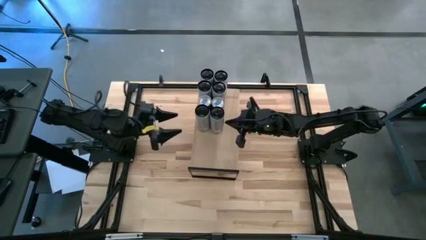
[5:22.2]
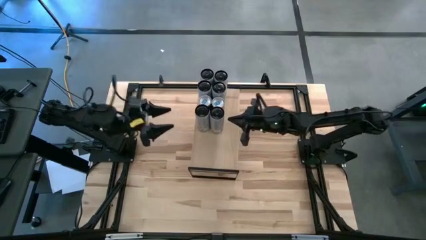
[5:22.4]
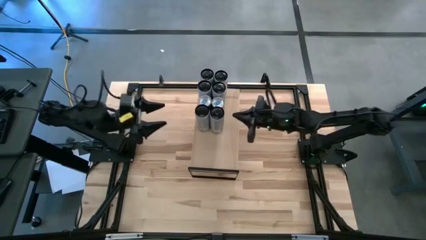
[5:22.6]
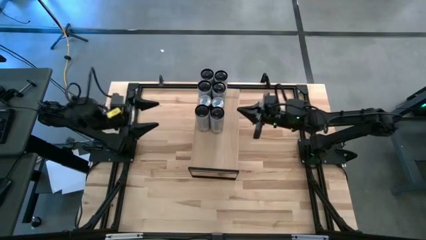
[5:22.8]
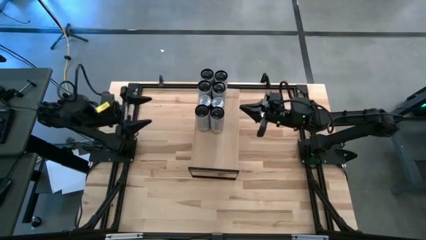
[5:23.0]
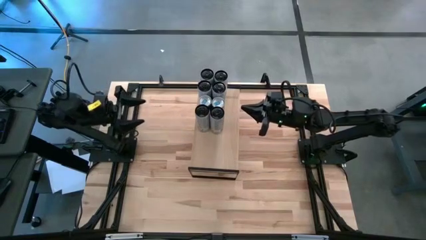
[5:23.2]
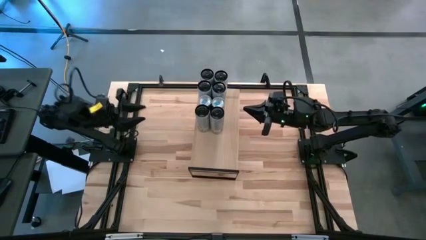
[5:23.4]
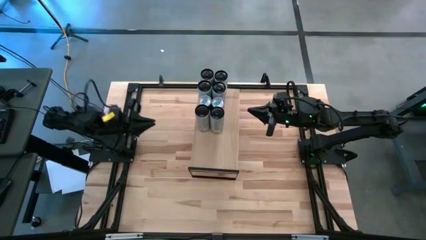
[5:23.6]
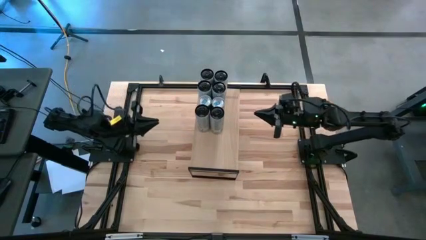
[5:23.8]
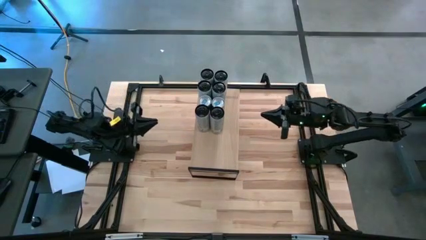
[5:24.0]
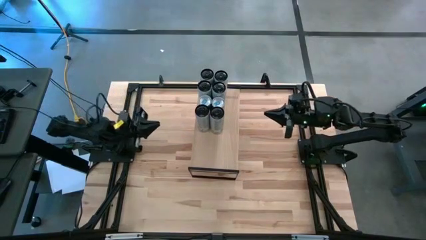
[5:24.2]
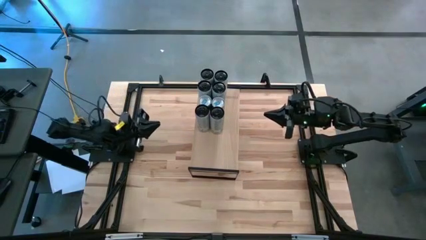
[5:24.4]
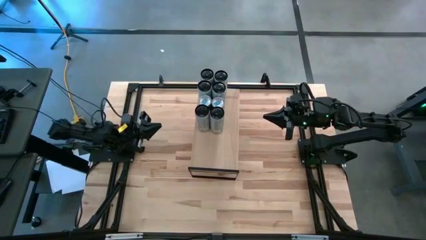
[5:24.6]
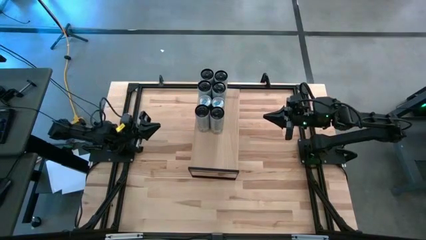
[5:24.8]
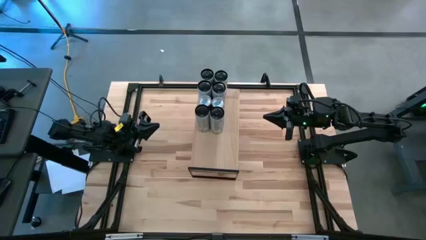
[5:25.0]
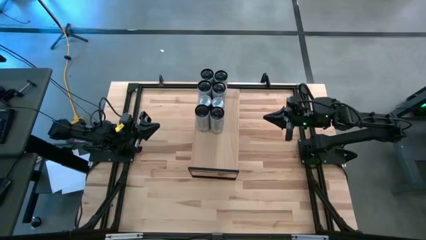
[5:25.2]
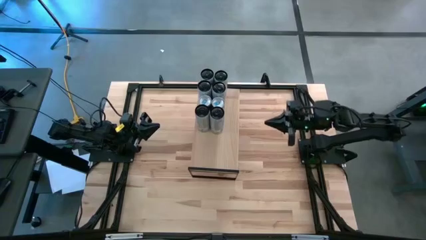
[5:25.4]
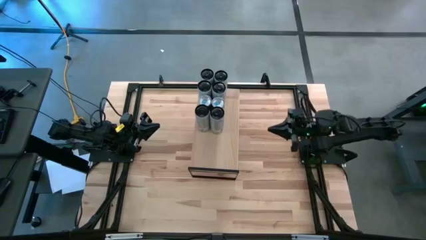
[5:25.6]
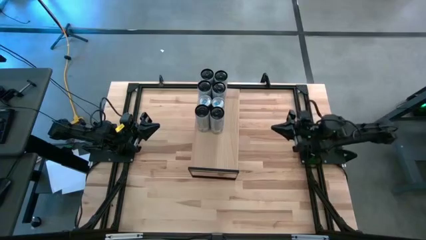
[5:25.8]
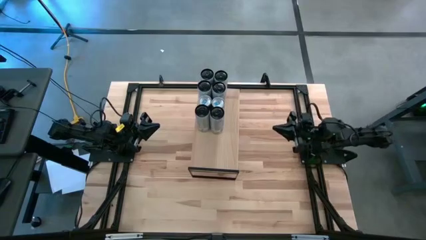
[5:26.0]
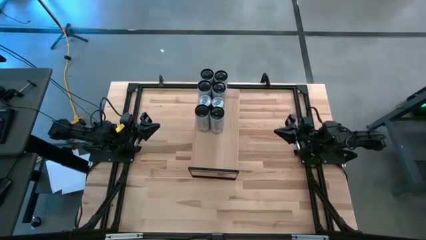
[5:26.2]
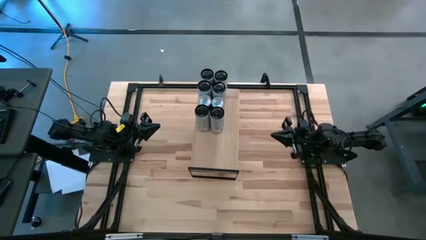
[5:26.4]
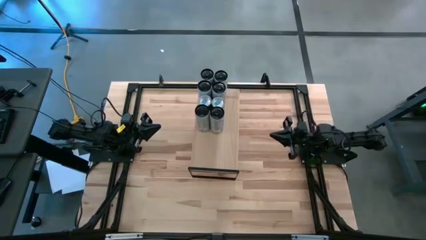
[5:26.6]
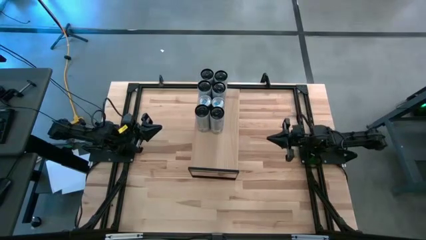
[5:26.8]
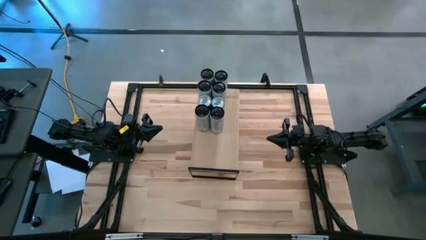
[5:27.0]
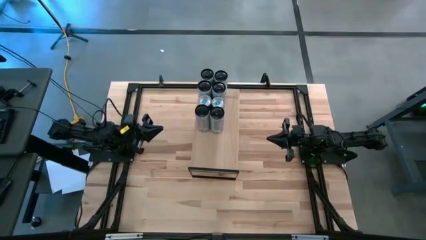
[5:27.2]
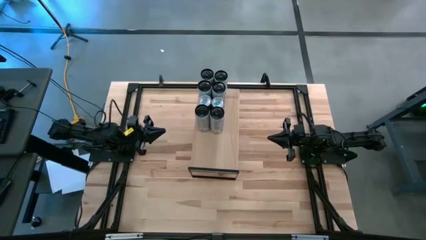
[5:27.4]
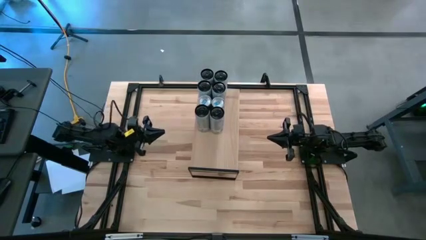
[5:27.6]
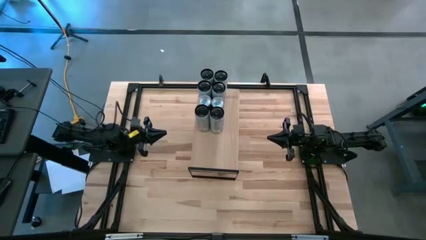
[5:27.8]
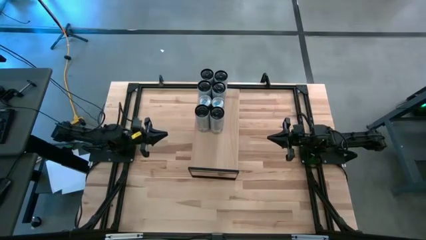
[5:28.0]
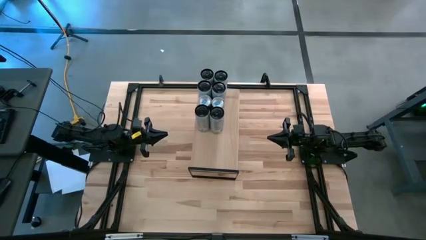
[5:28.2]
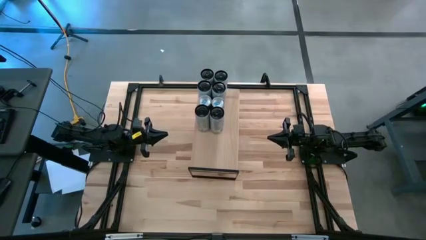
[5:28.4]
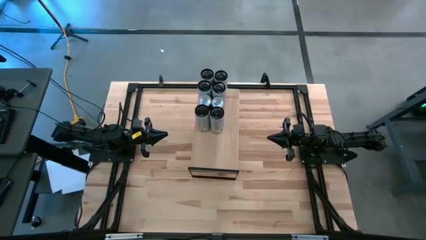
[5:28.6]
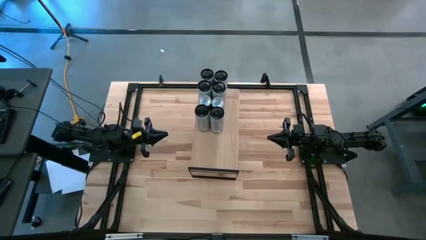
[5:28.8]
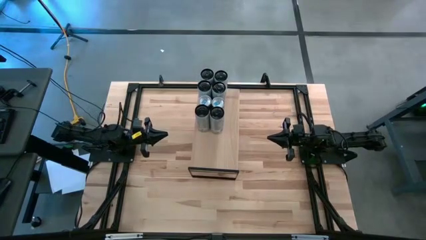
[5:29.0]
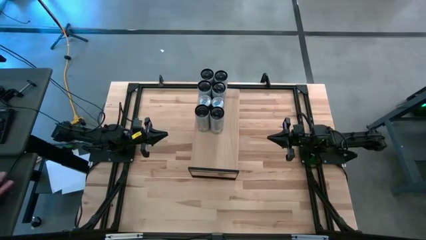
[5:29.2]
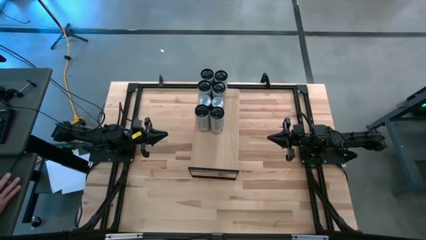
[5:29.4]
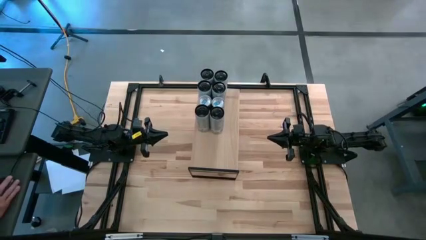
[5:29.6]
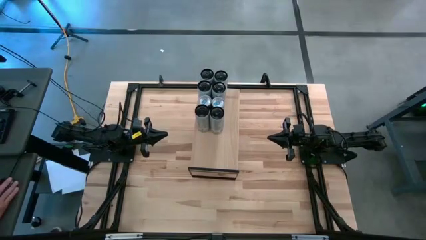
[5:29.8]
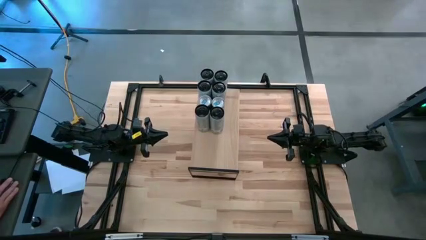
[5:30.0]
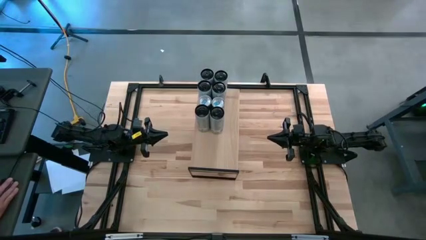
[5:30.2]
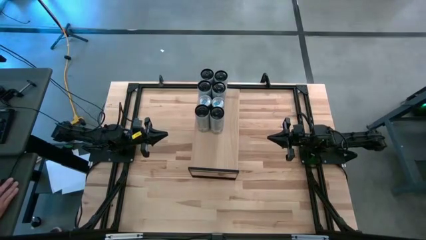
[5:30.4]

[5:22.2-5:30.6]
Task: Place canned beverage on shelf
Return to Home Position

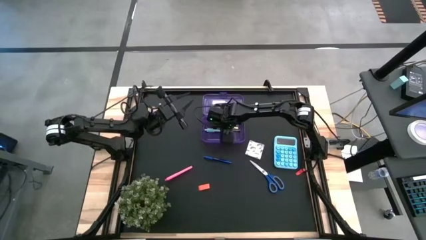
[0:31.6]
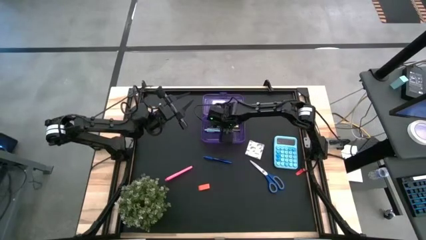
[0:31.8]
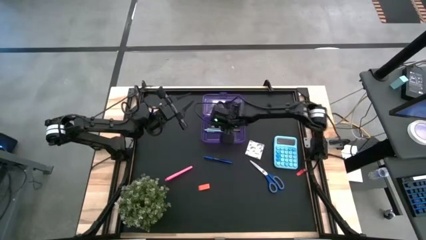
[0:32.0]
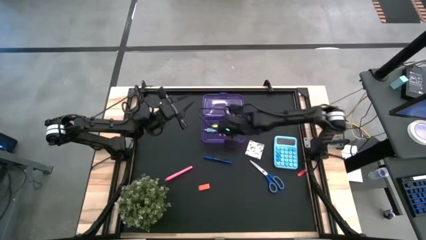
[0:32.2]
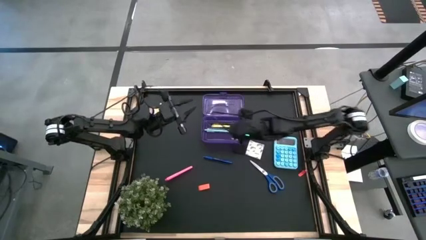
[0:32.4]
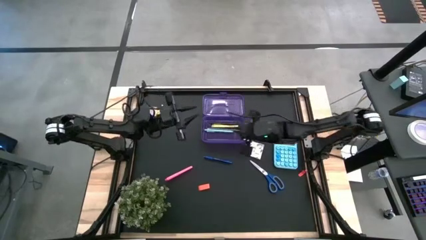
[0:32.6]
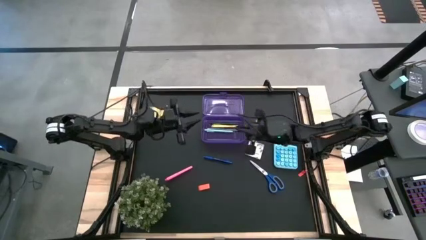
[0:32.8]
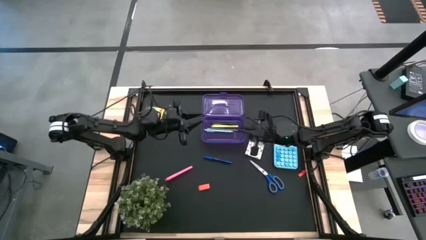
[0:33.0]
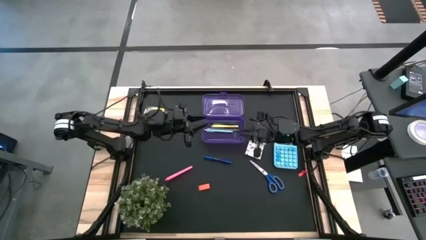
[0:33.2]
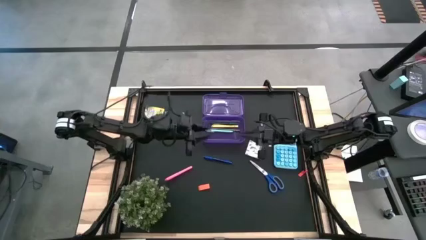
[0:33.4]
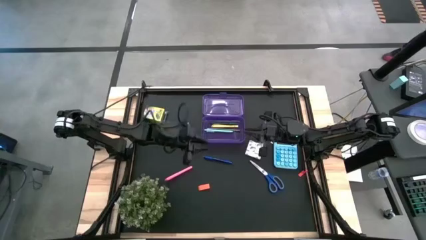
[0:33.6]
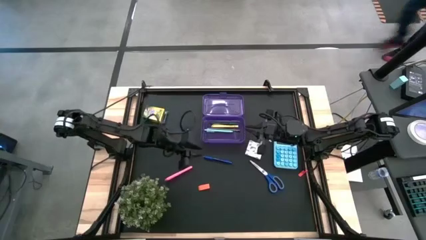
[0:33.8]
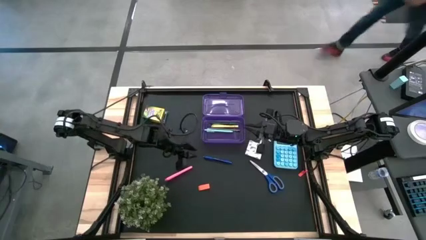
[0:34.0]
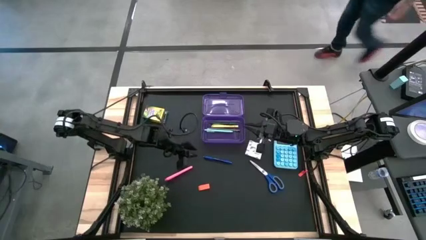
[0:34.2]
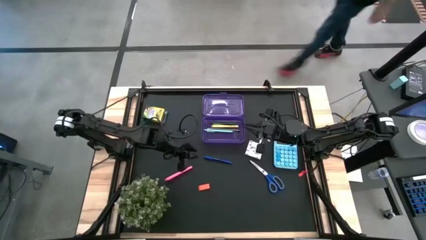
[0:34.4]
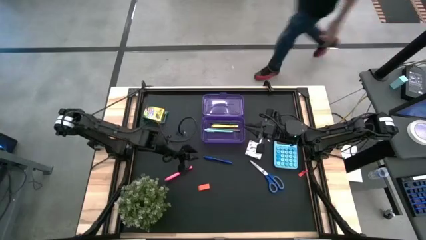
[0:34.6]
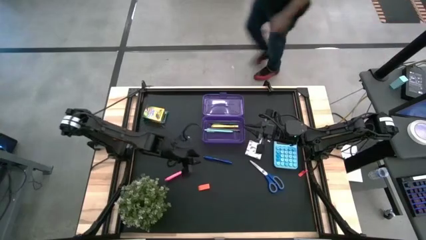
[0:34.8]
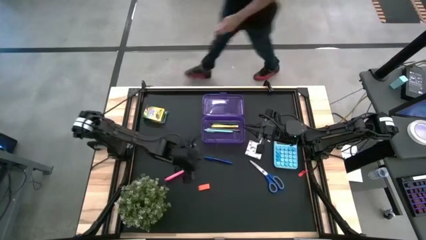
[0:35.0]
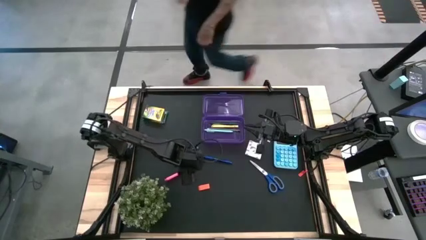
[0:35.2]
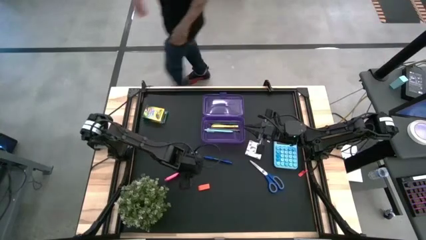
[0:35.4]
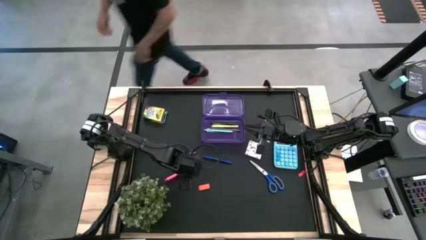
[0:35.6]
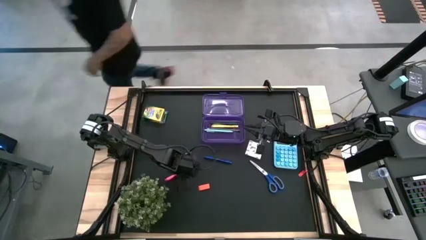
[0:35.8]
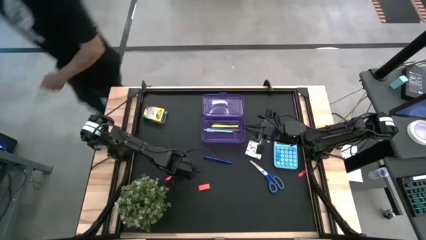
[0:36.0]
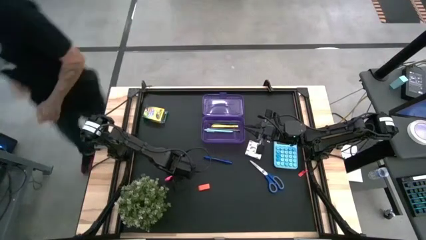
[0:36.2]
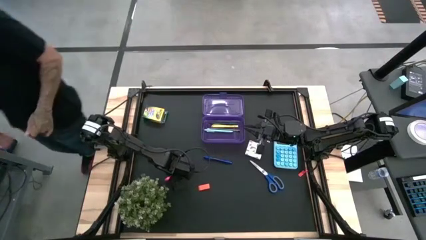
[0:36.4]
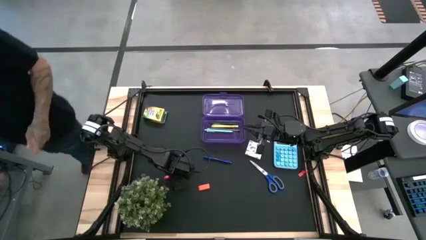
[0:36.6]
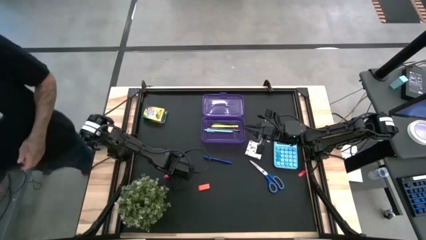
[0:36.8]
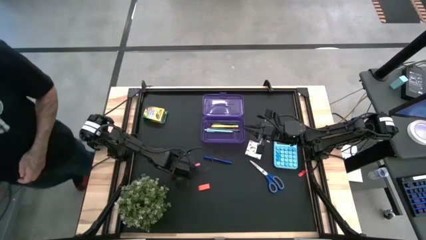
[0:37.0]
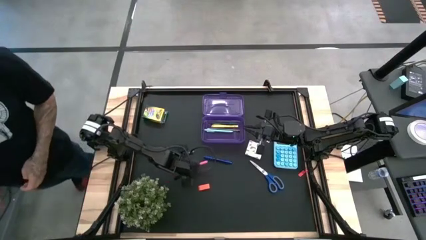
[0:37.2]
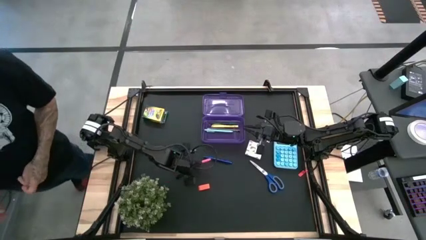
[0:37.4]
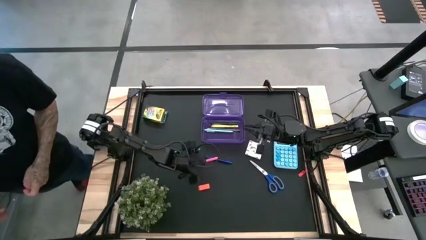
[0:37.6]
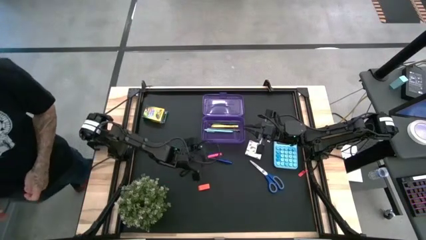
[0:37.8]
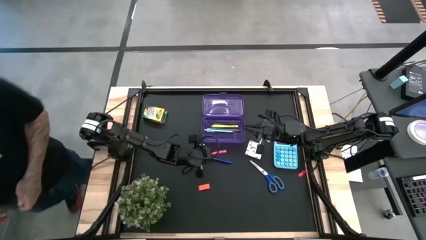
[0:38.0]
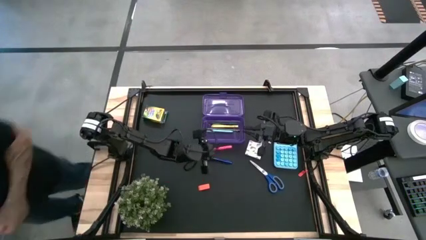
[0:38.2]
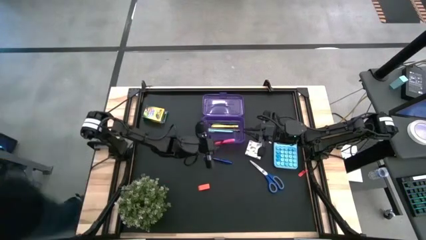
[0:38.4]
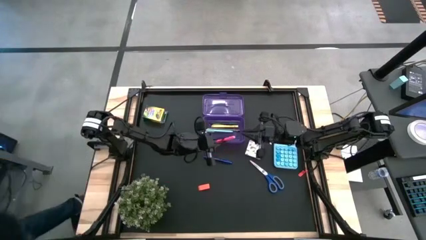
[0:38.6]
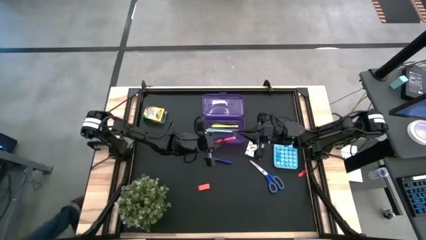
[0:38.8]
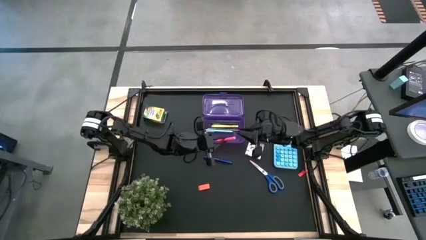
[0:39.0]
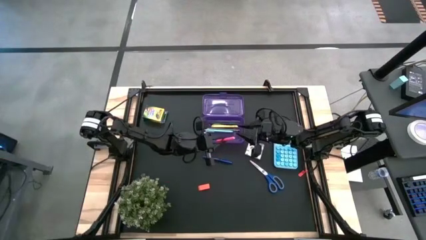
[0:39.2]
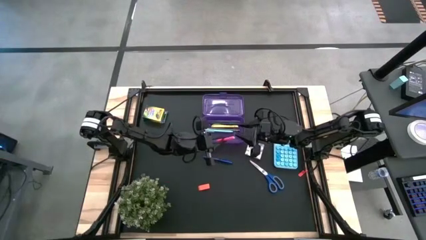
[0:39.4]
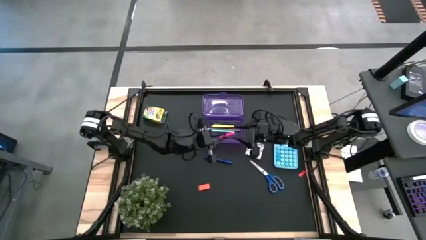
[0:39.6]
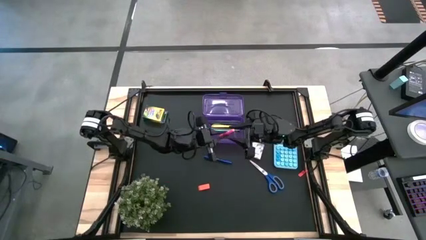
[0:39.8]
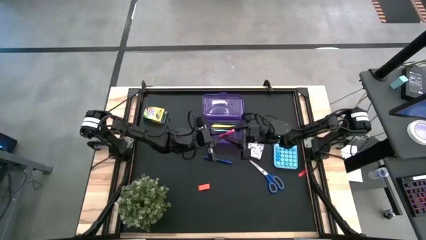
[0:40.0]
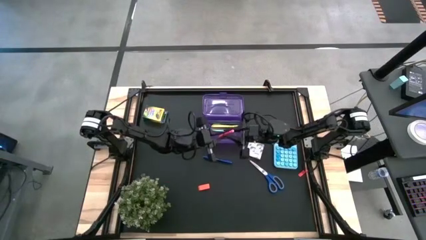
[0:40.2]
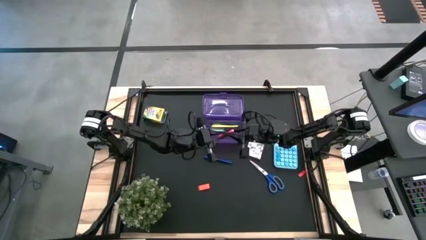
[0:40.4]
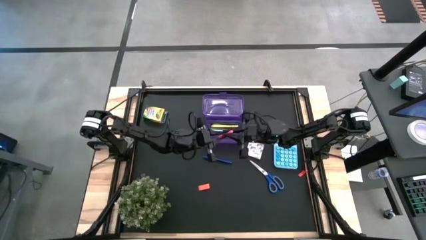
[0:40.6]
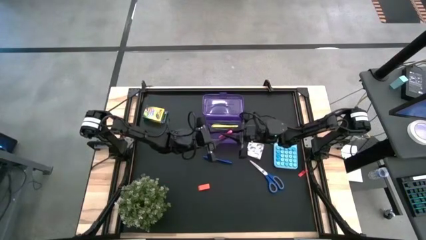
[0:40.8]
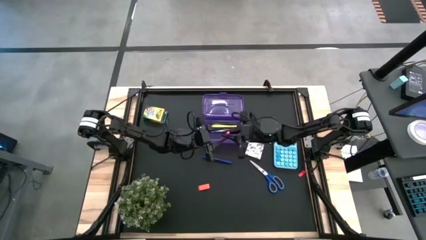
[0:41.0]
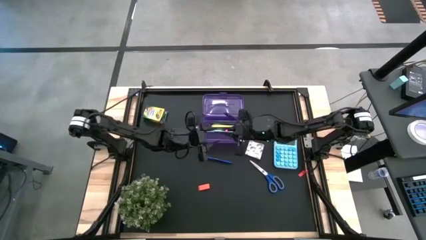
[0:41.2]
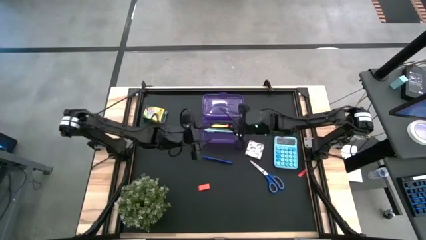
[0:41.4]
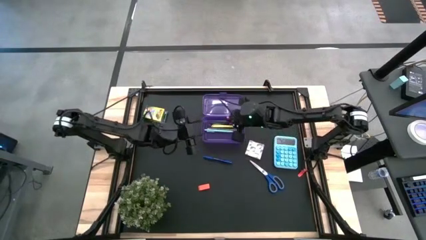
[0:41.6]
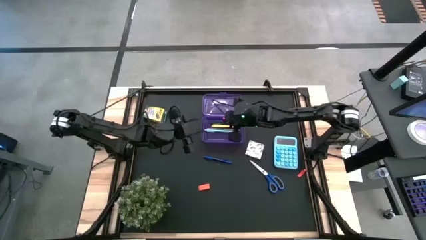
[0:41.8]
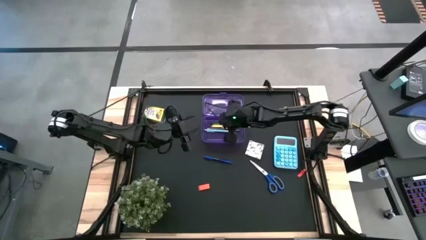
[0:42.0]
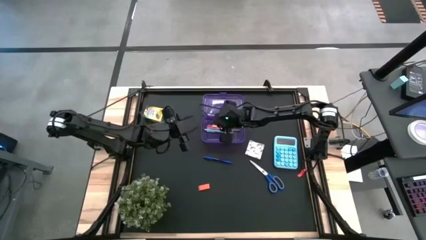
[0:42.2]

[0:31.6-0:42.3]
Task: Pack school essentials
Put the pink pen into the purple box
